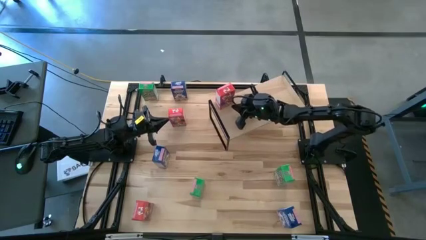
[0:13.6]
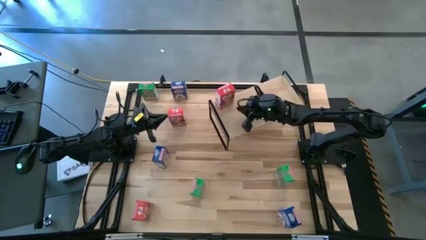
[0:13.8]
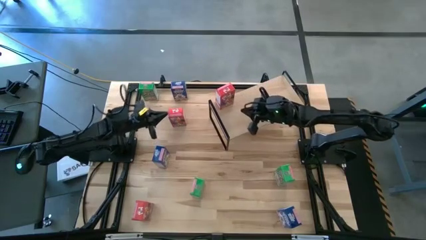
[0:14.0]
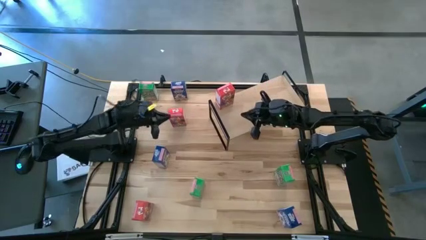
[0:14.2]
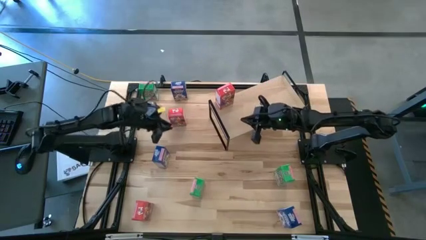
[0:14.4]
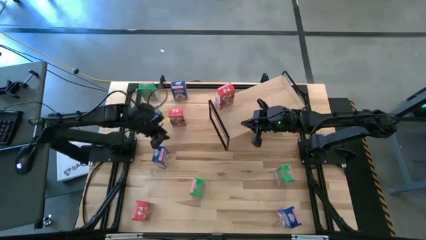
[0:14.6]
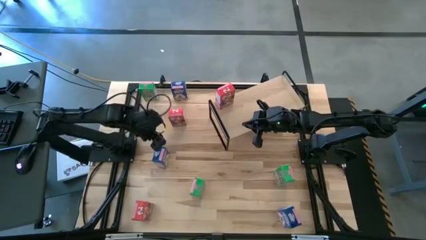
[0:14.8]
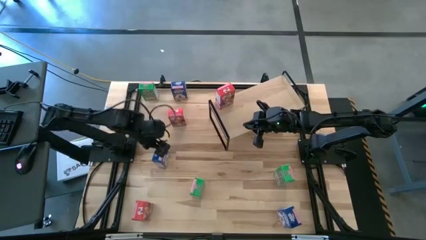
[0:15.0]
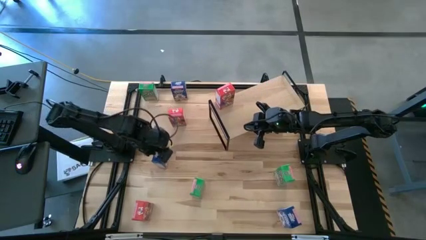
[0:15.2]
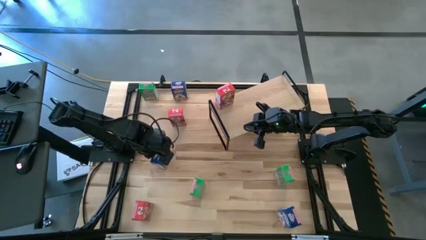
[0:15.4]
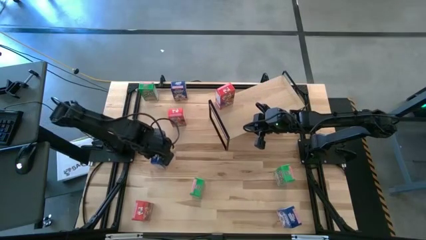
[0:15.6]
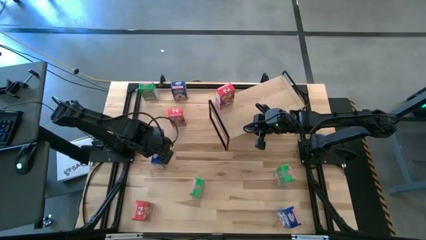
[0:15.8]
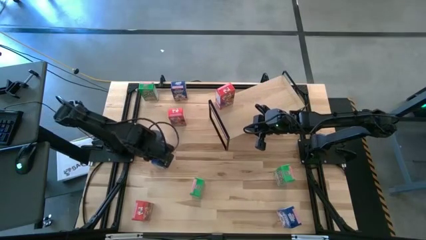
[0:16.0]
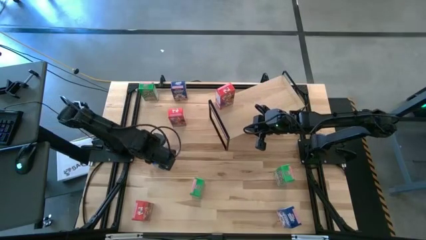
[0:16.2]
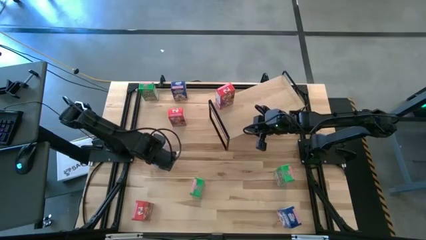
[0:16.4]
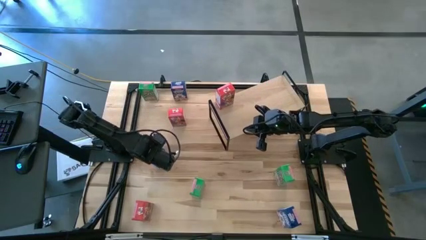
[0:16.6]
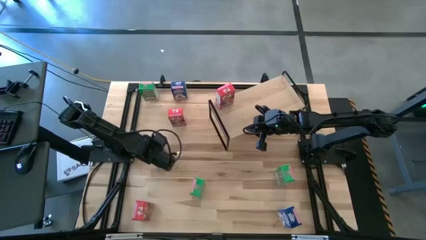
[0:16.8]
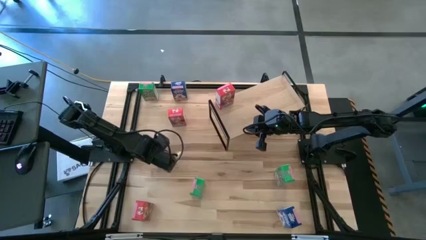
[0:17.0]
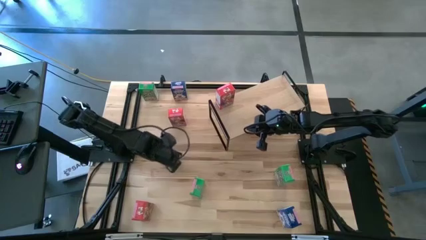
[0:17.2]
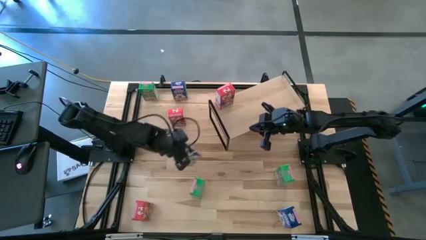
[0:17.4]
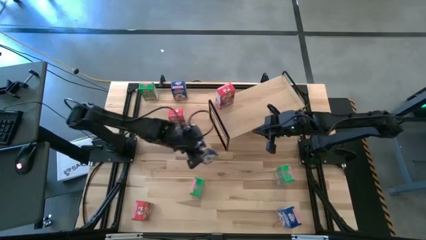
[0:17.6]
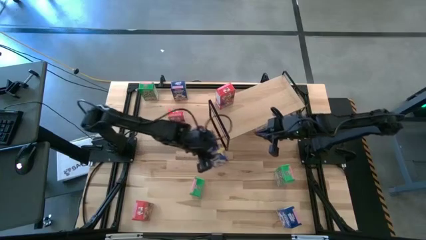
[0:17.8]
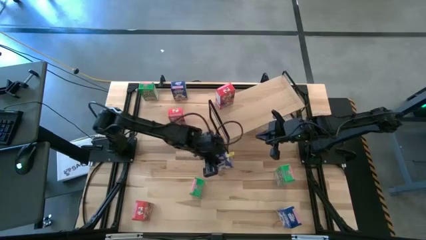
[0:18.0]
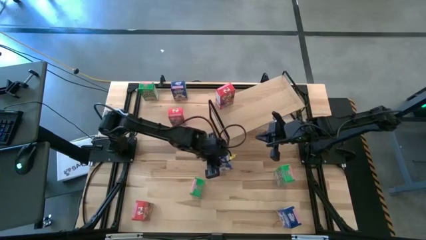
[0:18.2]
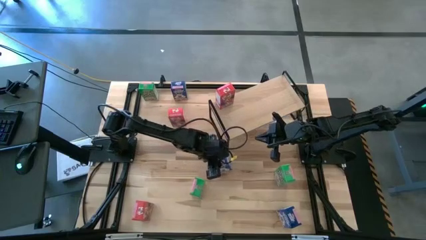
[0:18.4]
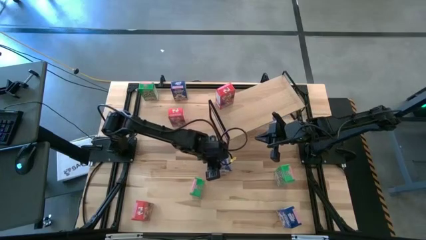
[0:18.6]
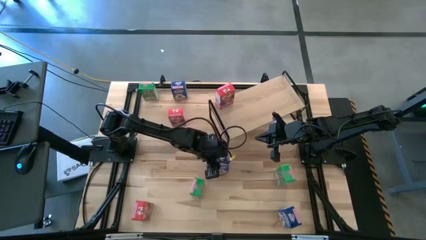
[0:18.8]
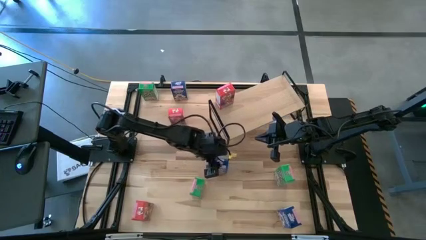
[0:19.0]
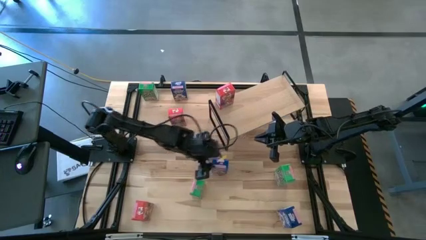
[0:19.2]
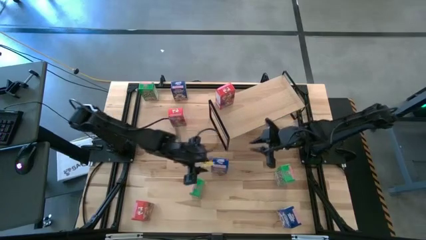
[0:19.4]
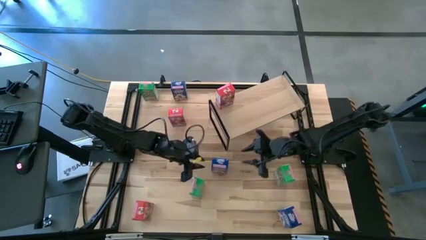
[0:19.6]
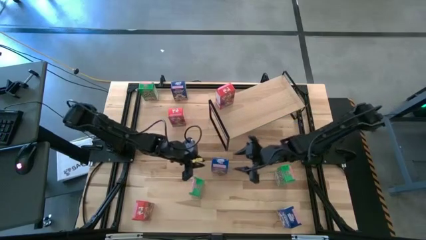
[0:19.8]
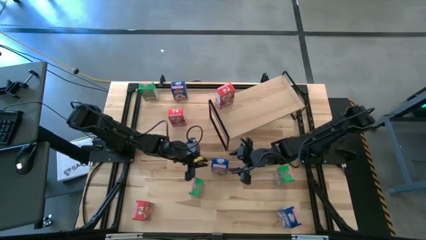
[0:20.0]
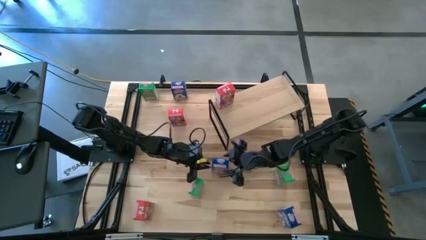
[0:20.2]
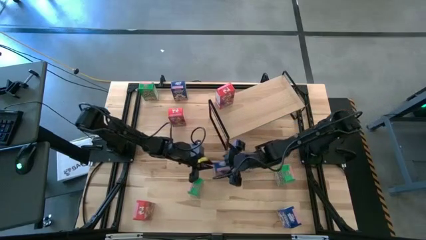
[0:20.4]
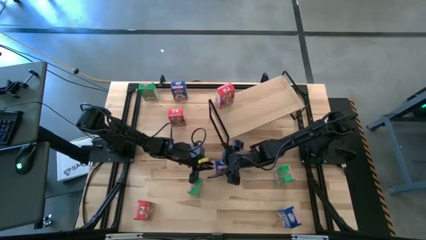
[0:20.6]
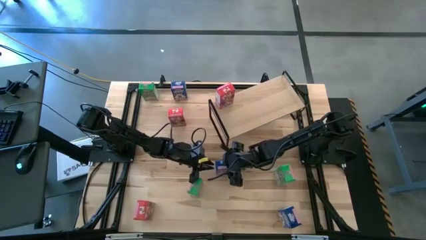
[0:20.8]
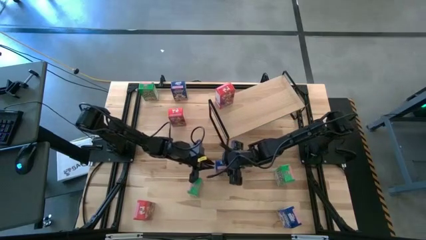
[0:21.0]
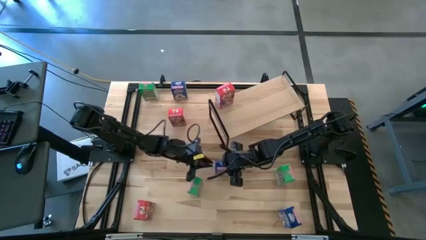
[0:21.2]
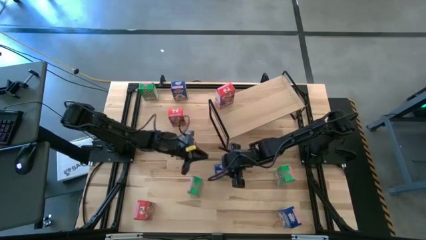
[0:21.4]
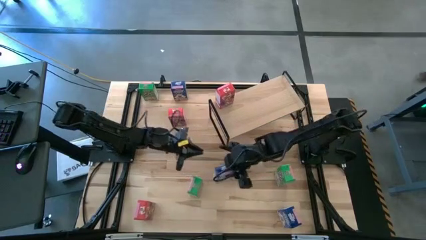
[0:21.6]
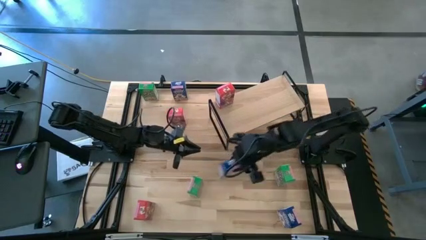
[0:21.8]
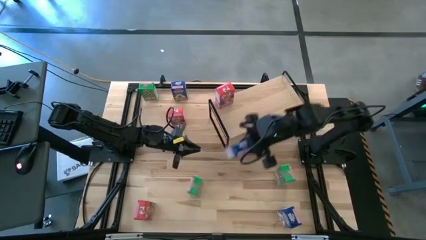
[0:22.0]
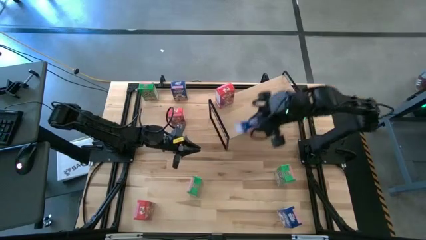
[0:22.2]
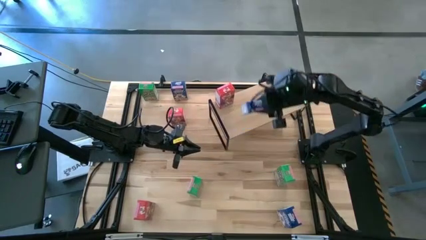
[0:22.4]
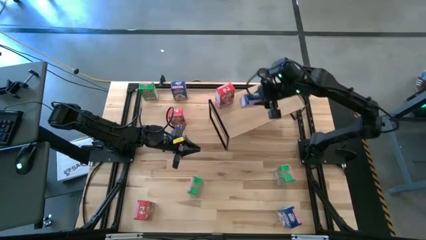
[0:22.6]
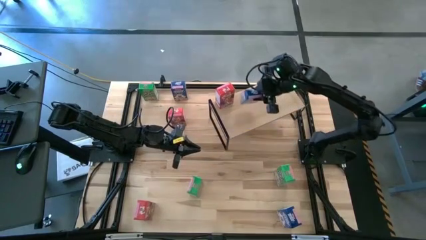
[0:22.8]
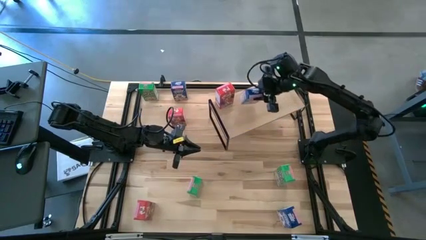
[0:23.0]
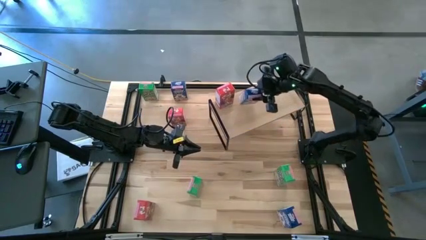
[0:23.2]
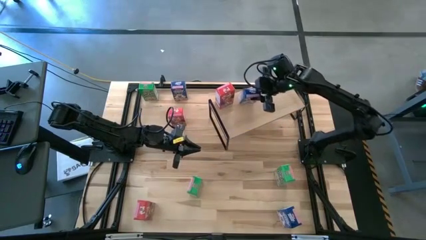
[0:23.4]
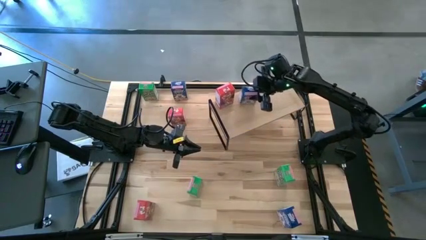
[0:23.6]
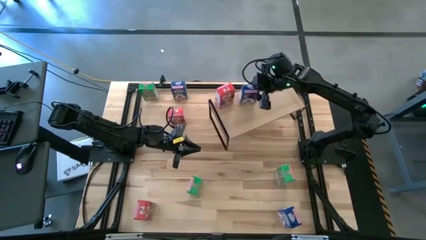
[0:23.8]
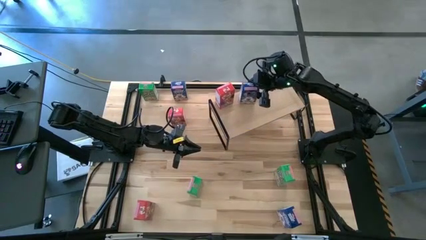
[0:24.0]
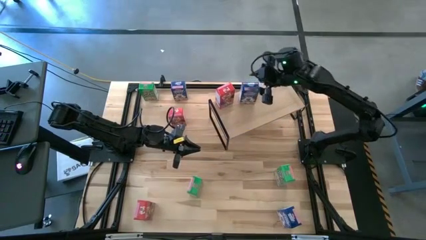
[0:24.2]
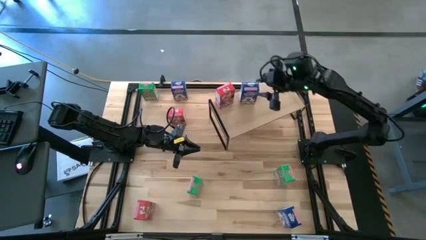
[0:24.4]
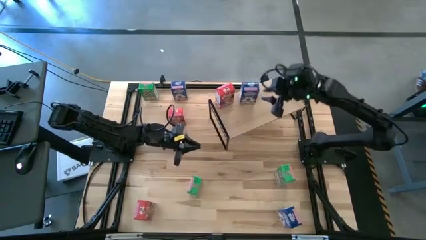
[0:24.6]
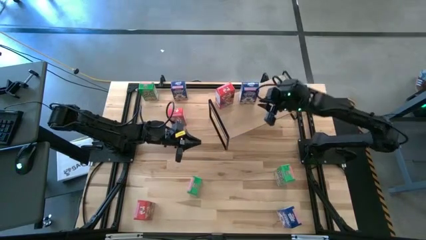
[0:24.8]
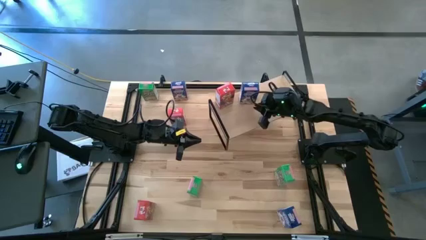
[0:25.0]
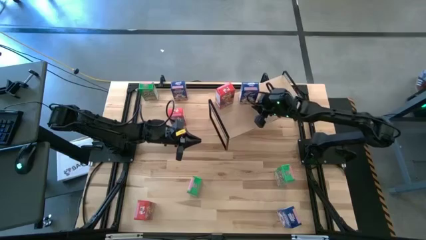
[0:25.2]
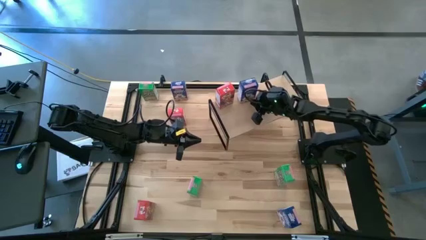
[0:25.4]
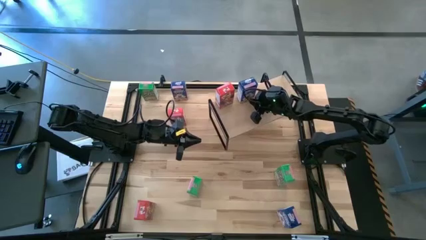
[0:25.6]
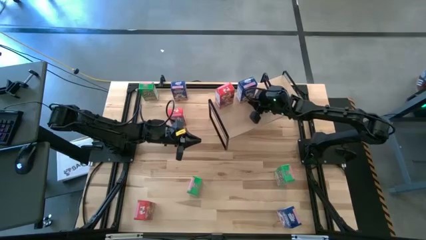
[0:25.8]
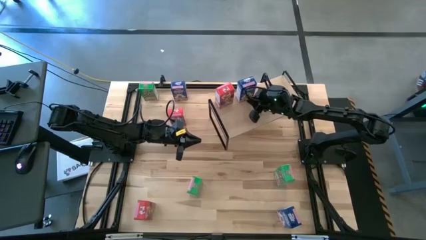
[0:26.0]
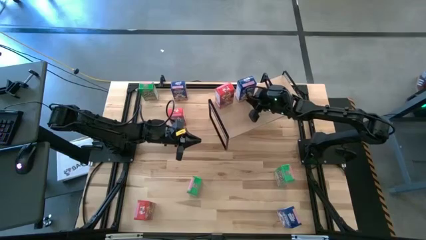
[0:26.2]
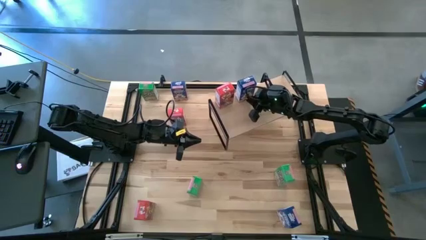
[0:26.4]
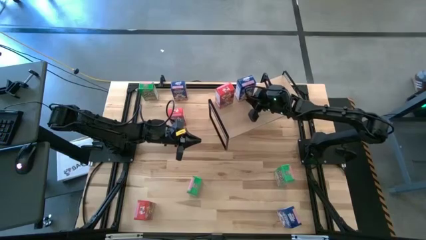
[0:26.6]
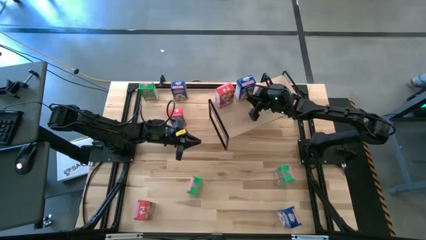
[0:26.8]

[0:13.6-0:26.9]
Task: Stack cereal on shelf
Put the middle blue cereal box on the shelf

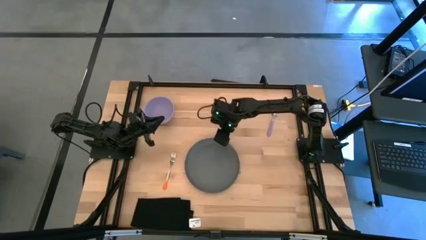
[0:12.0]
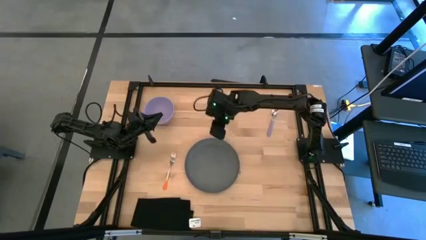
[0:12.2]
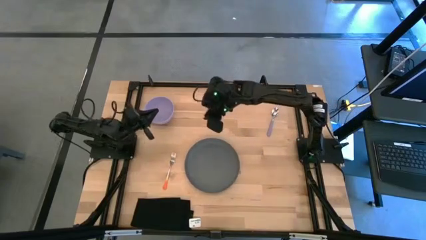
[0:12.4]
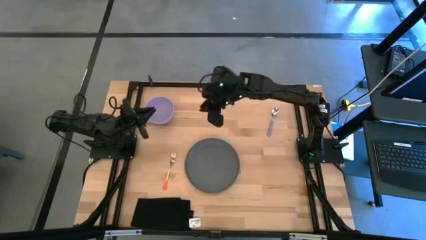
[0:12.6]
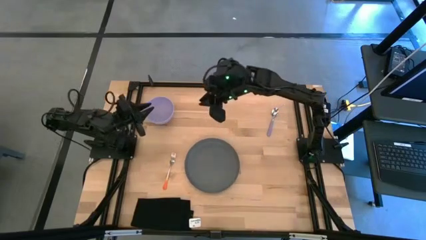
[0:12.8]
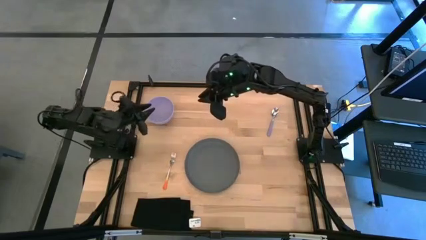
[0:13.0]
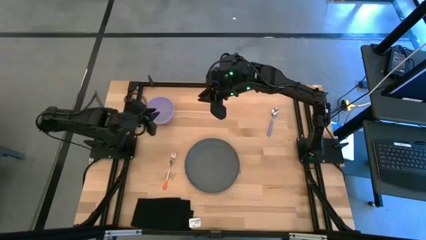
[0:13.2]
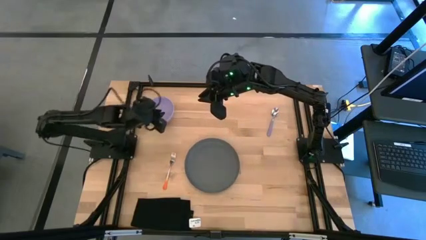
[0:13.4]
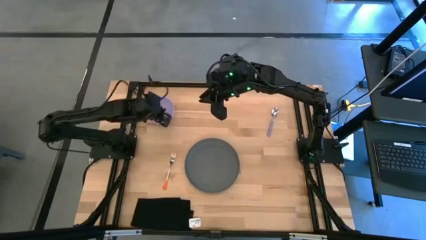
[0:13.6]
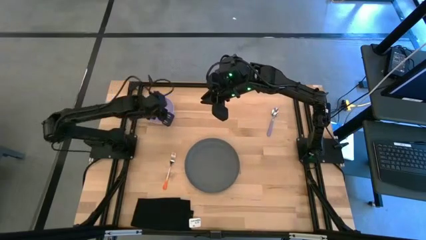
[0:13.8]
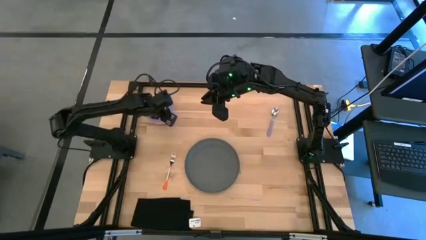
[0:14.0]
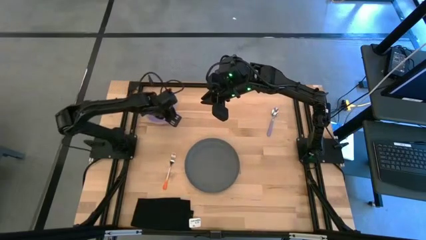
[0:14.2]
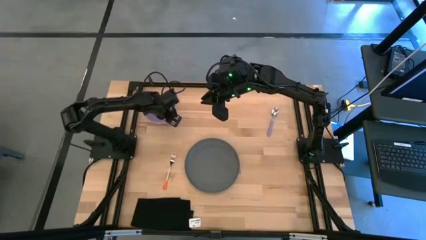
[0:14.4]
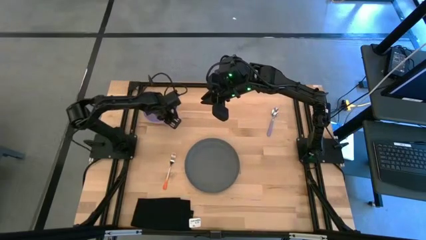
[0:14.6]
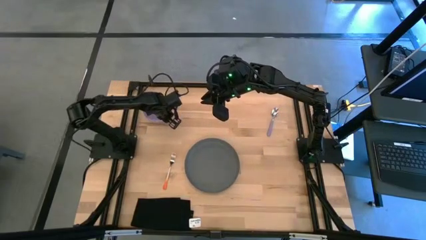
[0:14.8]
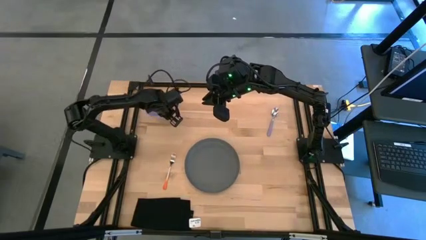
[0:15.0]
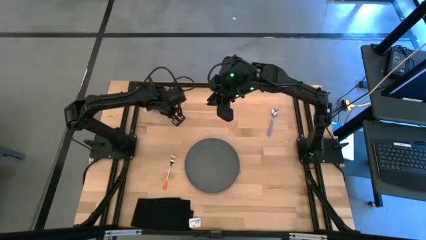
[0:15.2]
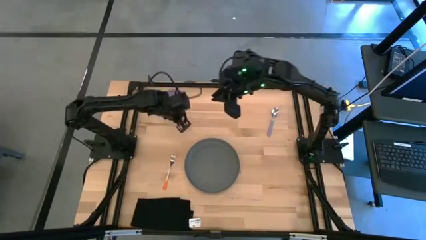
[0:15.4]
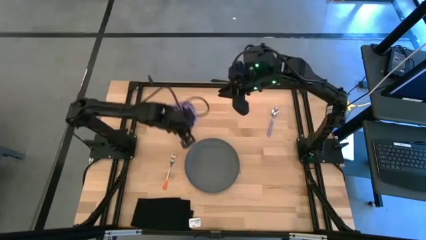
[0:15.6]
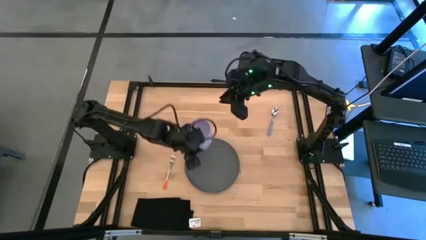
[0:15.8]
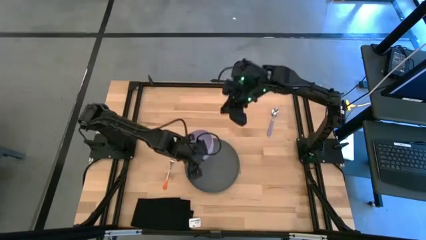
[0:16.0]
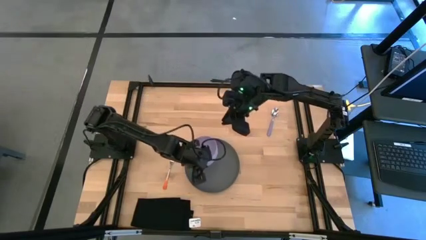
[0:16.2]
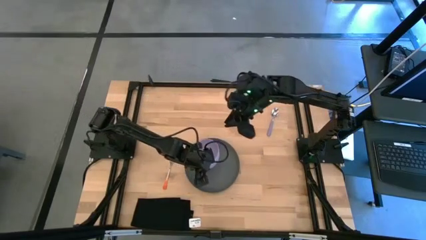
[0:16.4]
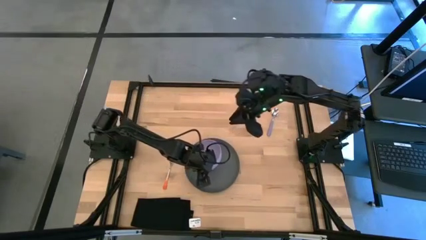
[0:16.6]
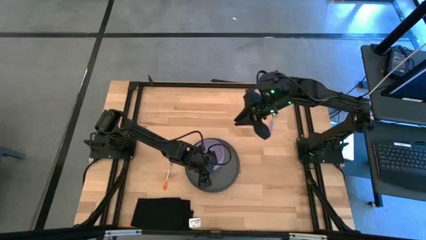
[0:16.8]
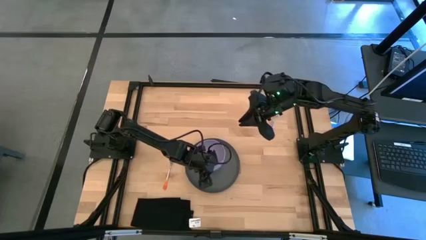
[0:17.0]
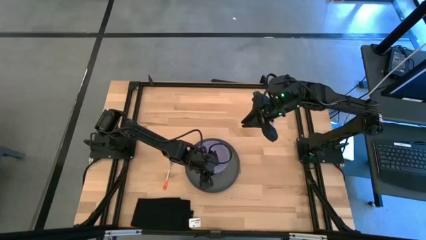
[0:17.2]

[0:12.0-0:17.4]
Task: Set table place
Put the purple bowl on the gray plate
